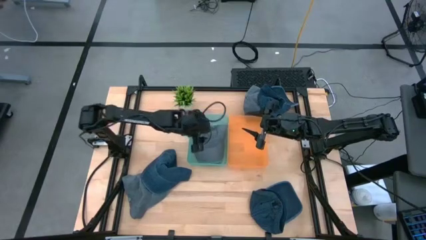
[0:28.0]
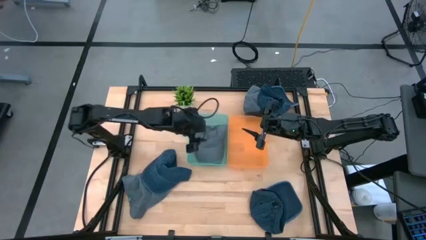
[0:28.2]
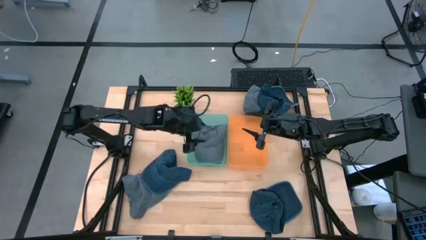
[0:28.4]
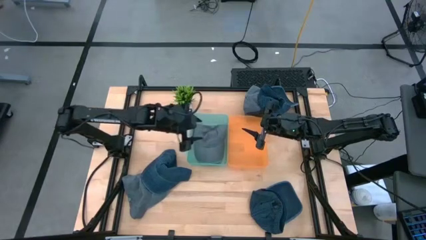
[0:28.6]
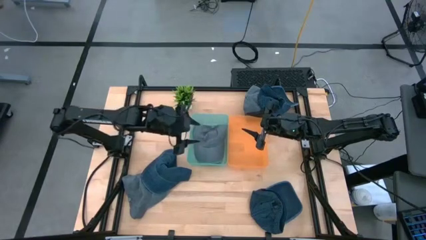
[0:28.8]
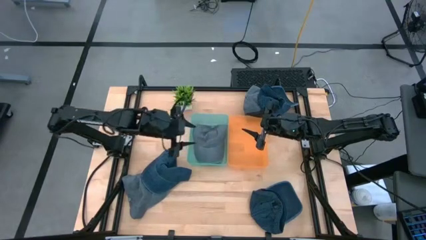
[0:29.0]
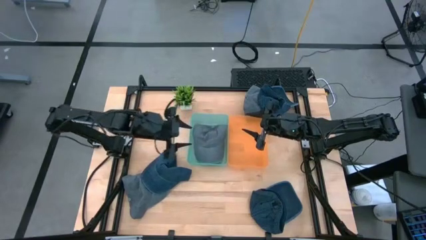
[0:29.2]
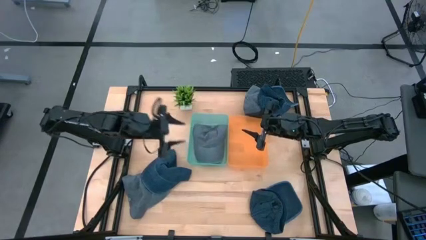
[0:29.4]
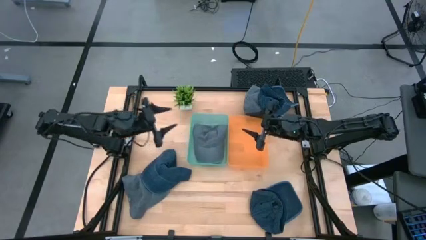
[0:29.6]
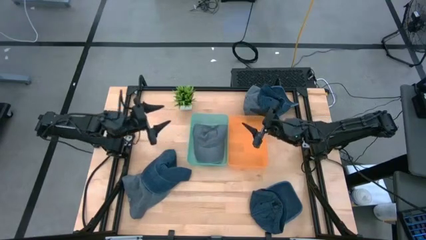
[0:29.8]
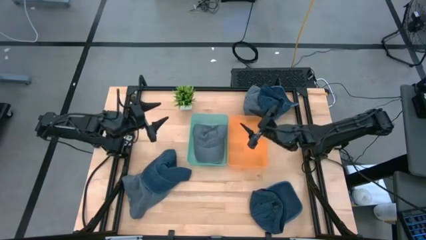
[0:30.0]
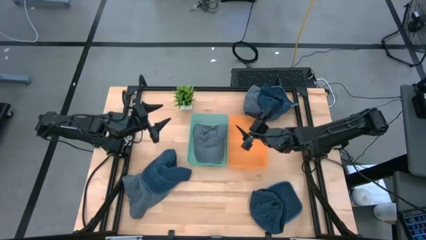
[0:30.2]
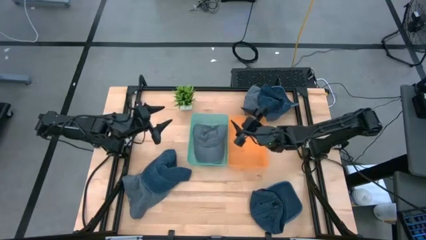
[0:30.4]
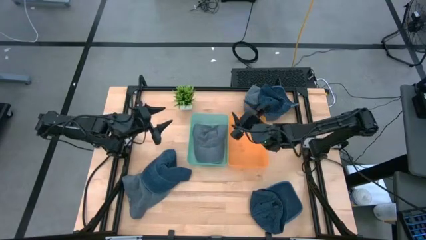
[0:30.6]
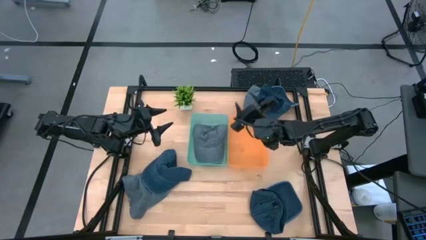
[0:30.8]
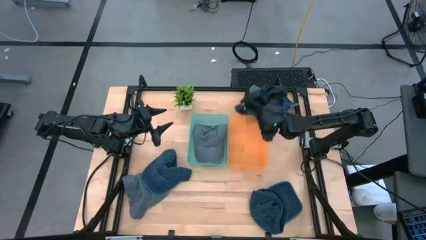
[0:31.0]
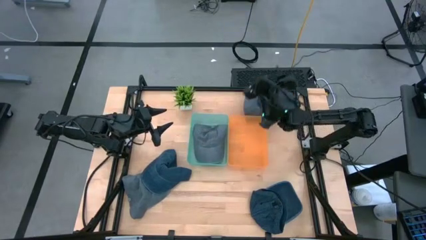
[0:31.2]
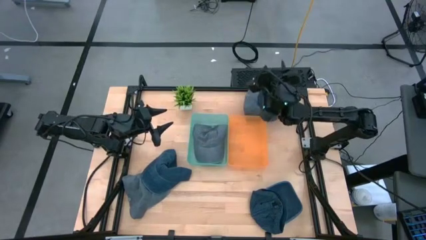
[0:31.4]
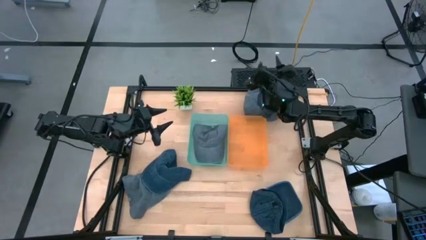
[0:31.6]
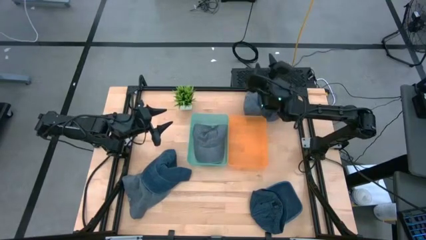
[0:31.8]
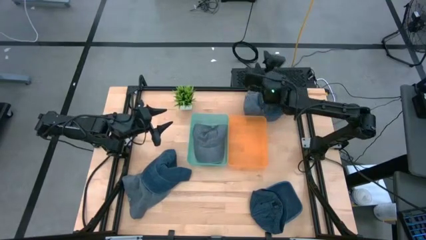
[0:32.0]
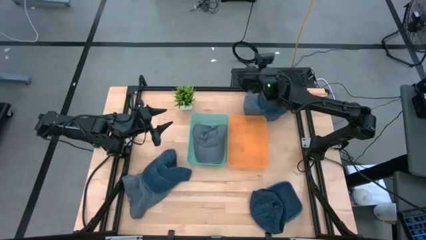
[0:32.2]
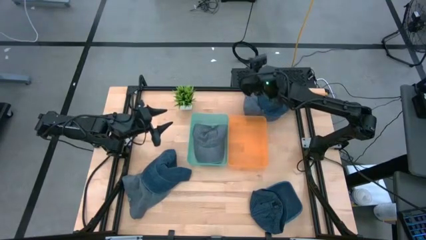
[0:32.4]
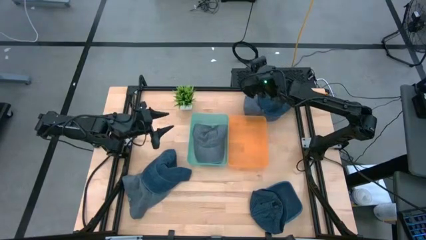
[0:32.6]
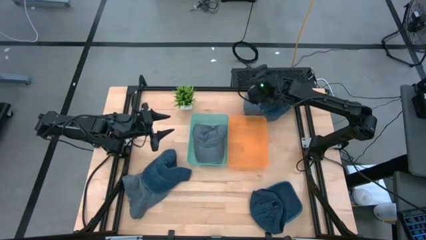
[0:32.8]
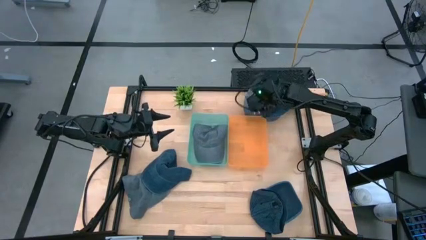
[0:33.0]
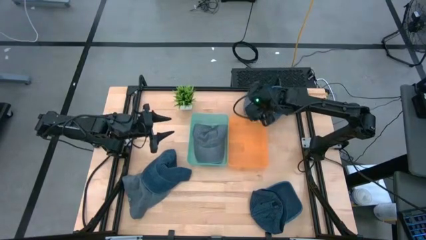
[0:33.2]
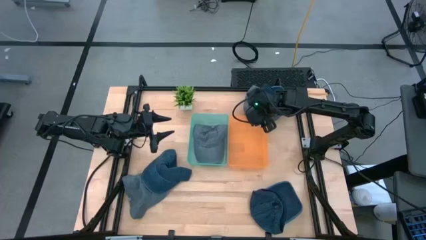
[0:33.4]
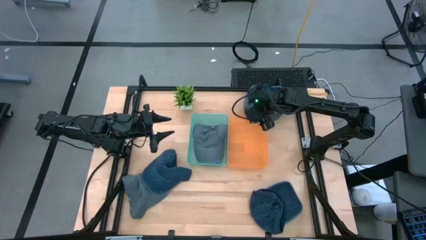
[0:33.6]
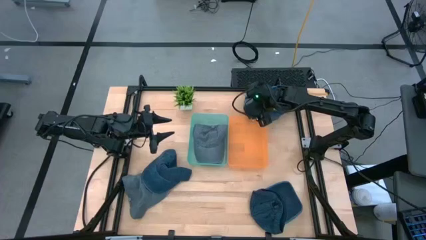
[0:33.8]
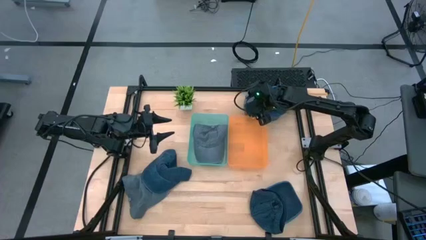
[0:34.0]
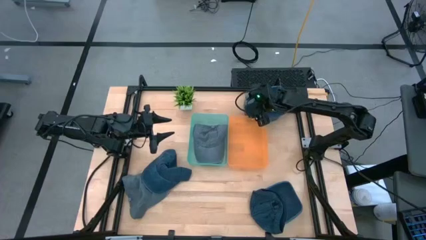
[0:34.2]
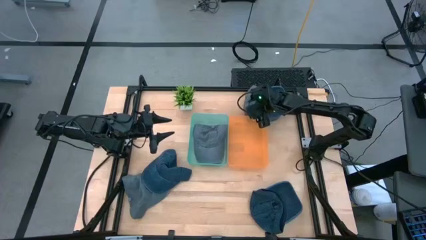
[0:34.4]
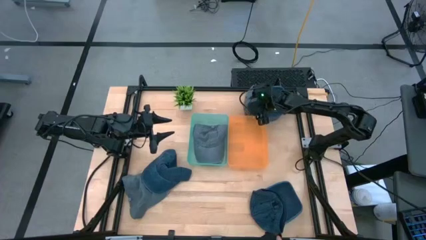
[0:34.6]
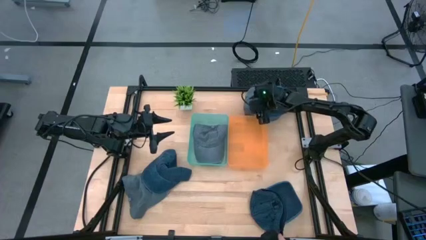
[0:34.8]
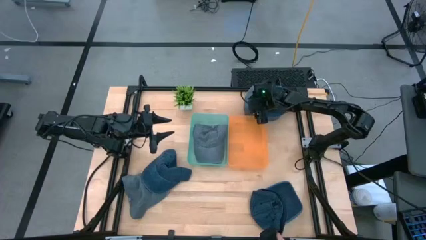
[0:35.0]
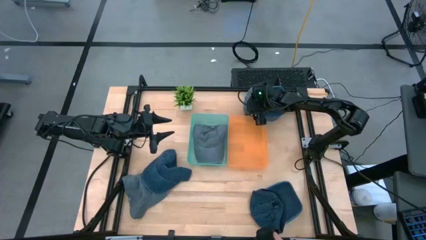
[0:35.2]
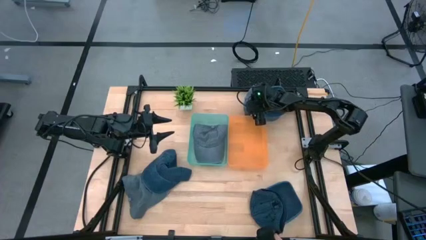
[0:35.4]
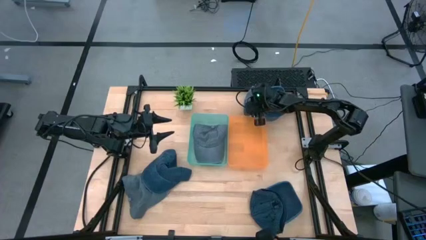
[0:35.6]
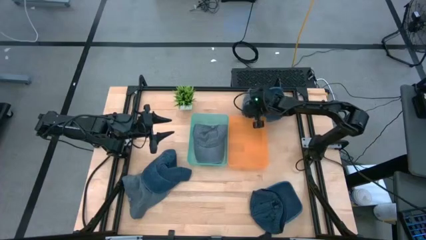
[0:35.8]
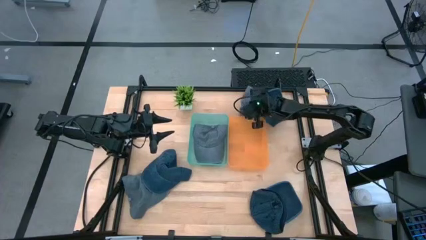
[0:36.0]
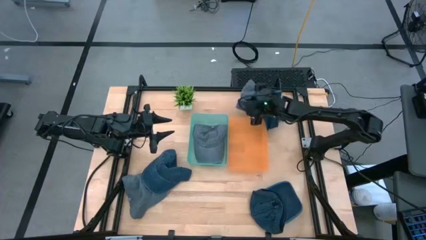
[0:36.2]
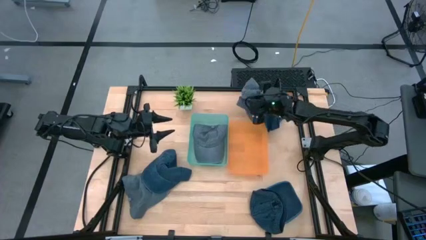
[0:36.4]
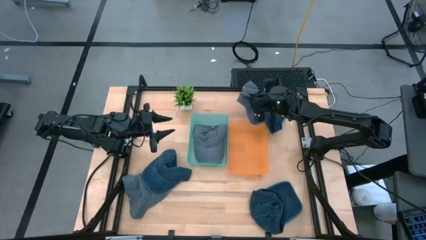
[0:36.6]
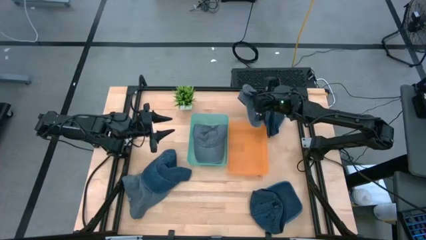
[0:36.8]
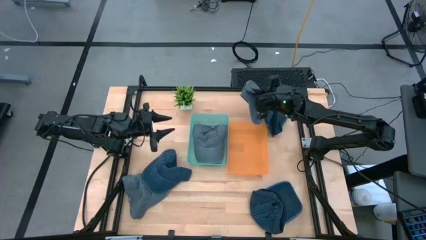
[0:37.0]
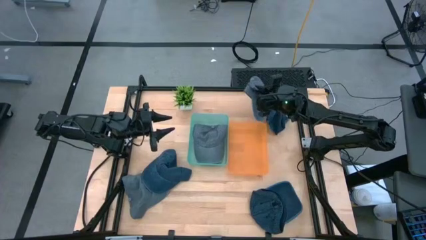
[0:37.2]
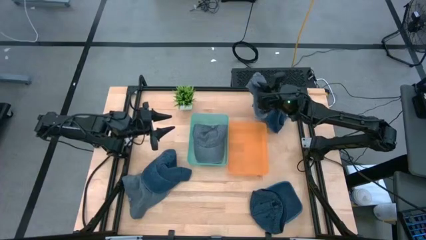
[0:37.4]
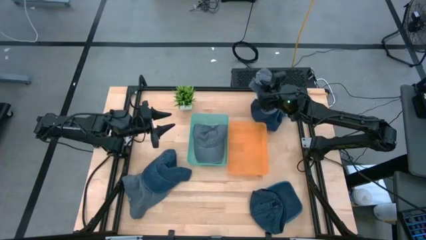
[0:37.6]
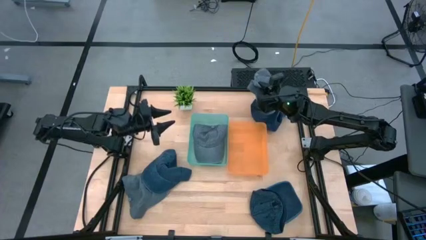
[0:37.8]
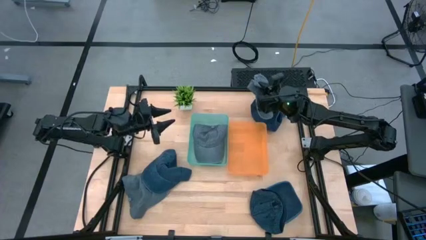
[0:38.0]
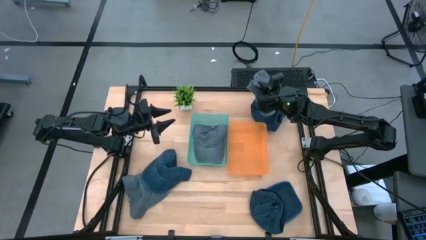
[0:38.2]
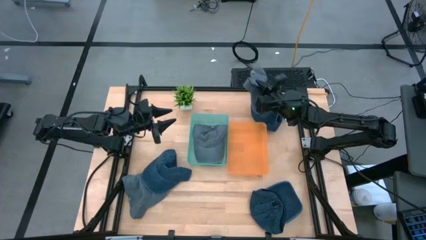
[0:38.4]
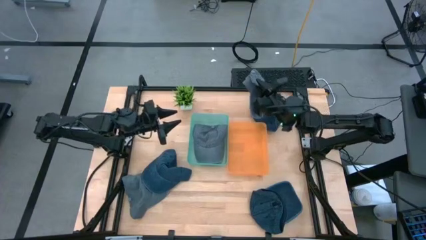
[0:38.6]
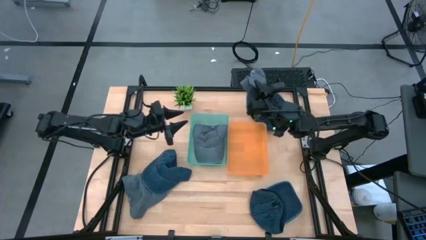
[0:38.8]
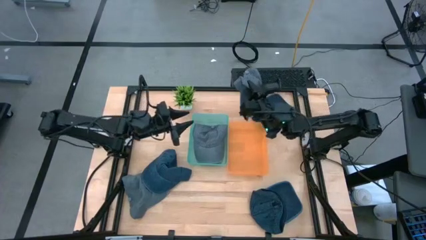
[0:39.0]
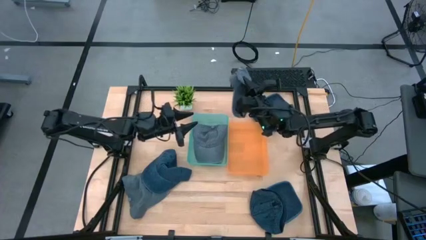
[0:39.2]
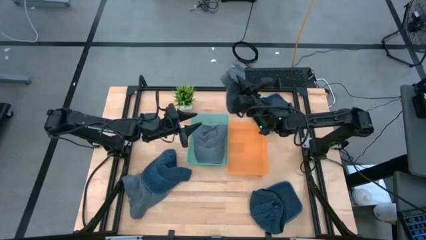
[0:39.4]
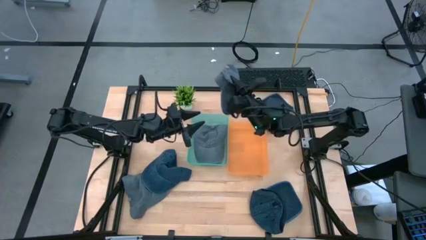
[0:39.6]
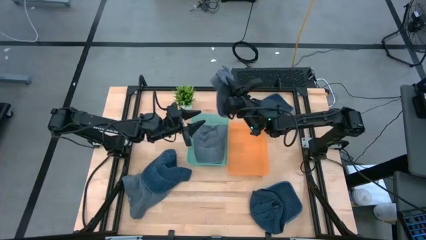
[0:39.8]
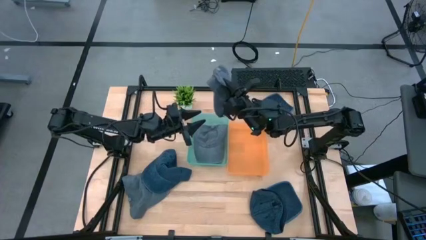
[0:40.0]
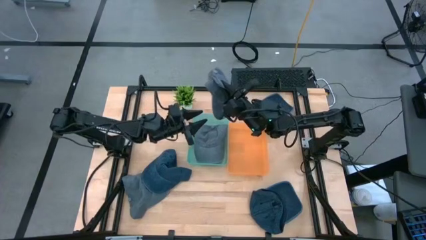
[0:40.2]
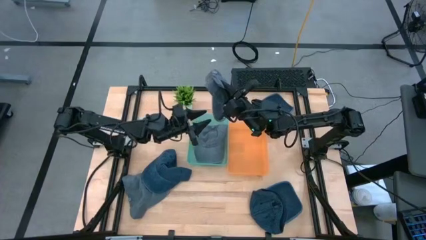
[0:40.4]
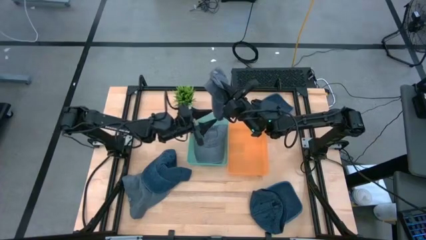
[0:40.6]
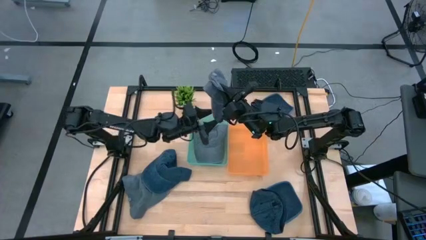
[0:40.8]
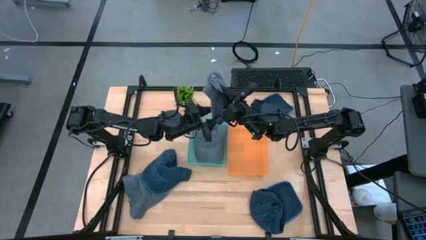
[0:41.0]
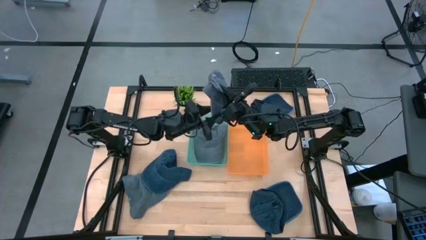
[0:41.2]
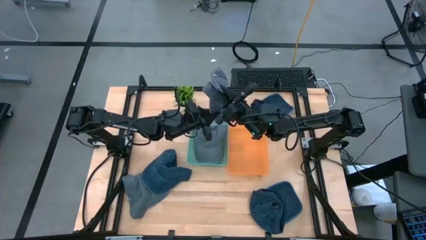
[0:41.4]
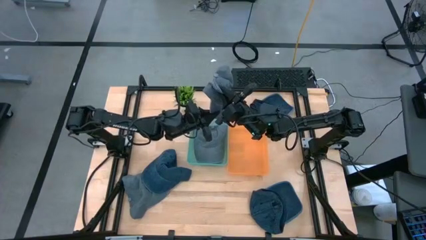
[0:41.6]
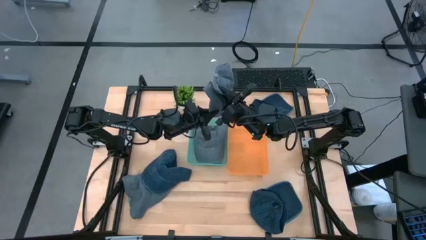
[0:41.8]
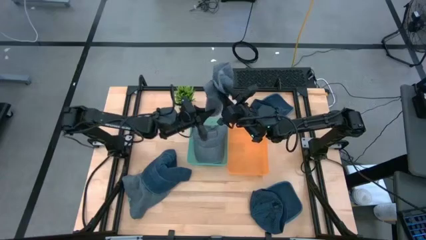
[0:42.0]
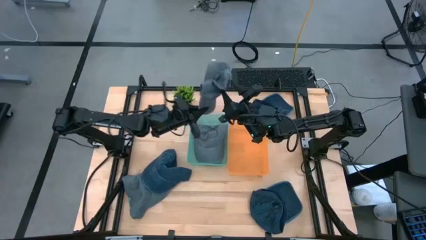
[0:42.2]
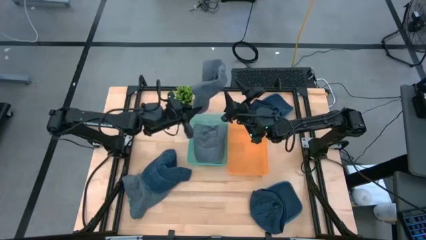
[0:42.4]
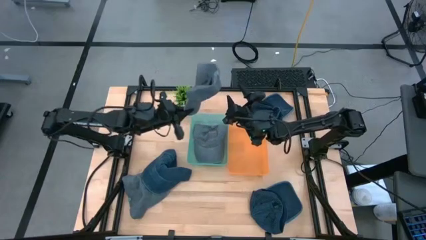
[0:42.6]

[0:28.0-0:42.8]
Task: Pick & Place hat
Put the top gray cap into the green bin
